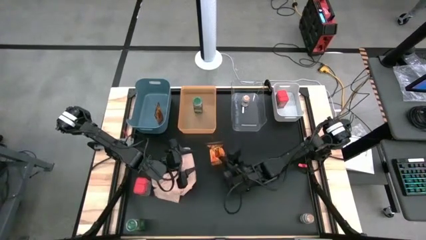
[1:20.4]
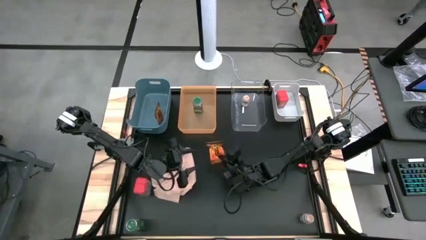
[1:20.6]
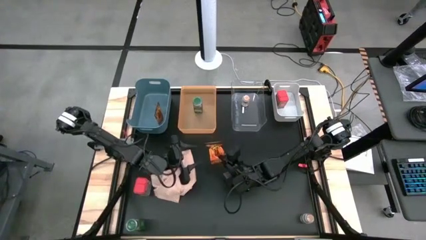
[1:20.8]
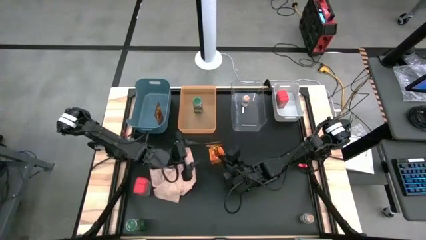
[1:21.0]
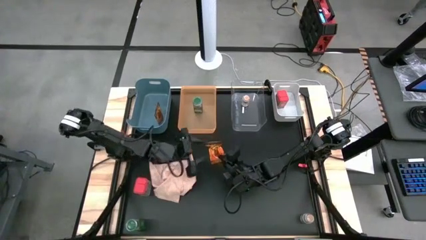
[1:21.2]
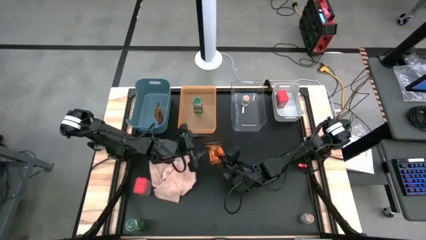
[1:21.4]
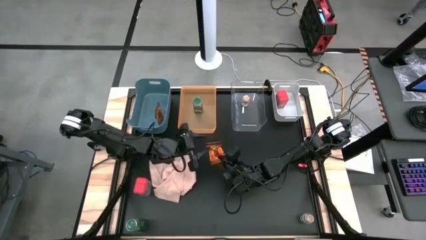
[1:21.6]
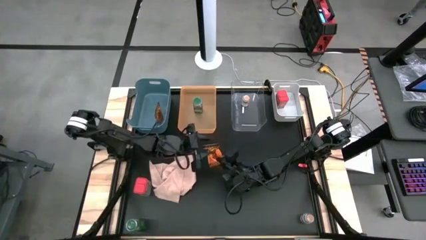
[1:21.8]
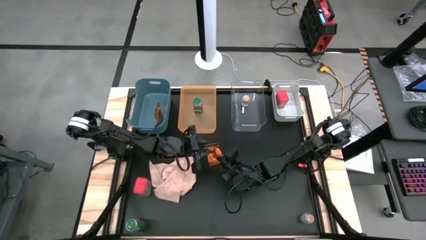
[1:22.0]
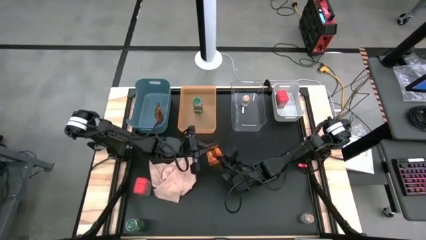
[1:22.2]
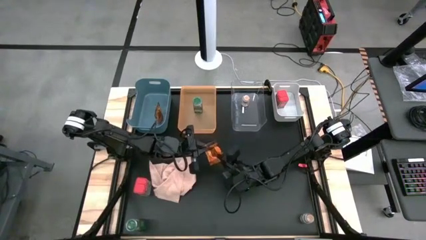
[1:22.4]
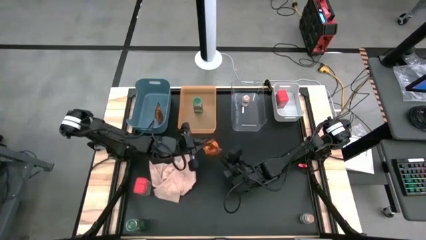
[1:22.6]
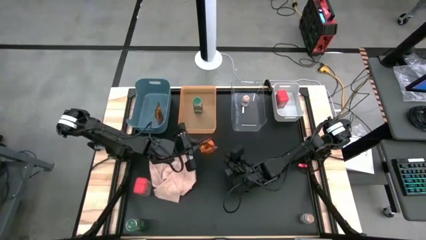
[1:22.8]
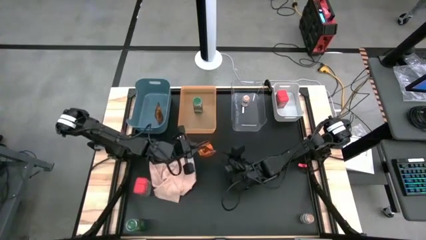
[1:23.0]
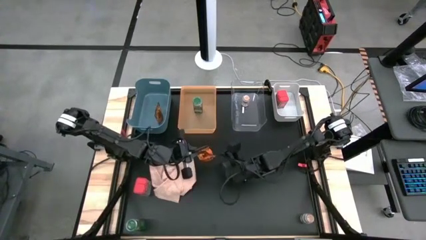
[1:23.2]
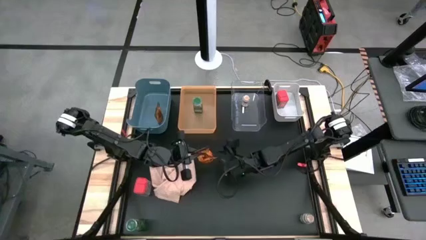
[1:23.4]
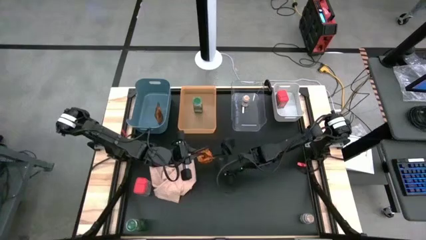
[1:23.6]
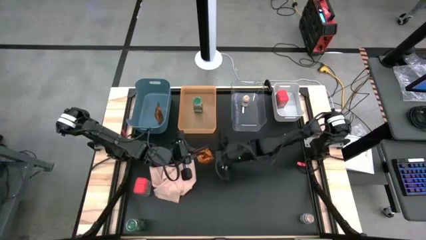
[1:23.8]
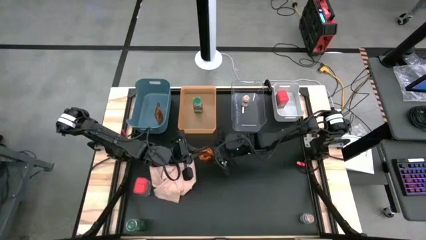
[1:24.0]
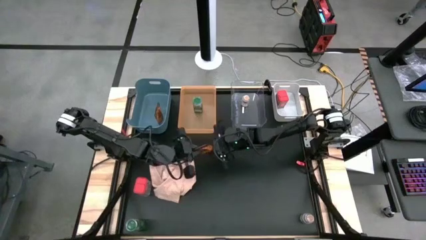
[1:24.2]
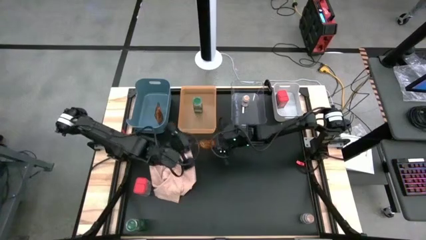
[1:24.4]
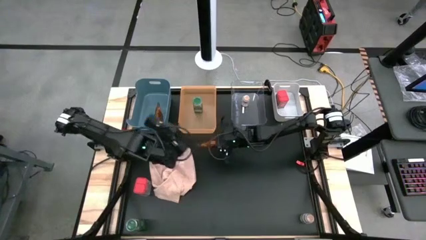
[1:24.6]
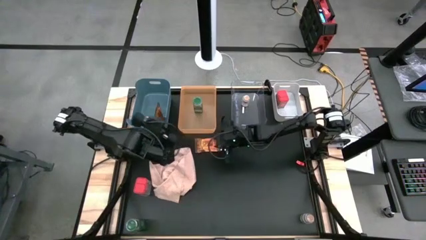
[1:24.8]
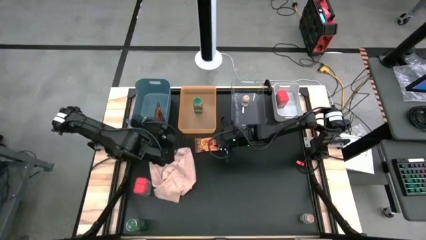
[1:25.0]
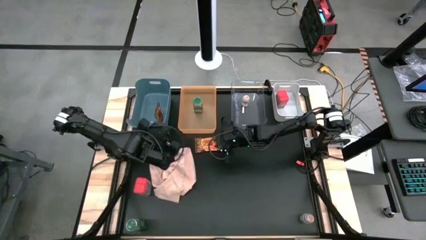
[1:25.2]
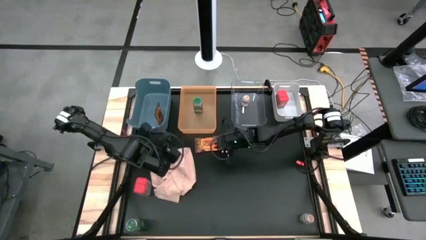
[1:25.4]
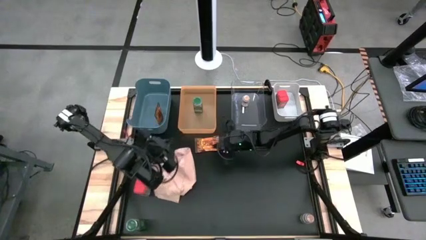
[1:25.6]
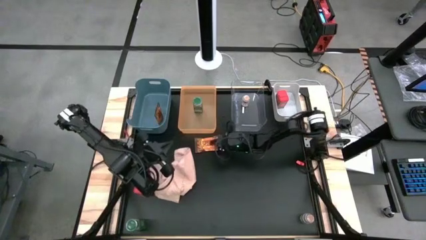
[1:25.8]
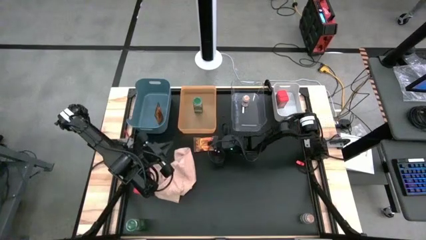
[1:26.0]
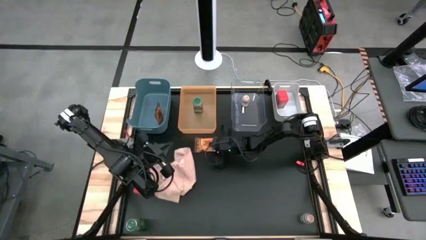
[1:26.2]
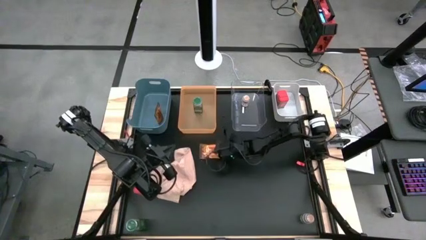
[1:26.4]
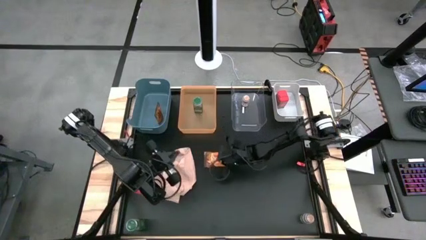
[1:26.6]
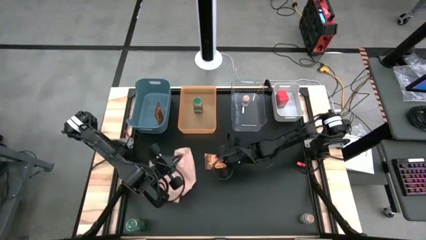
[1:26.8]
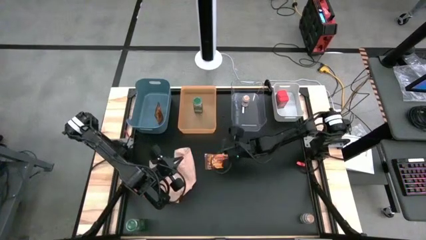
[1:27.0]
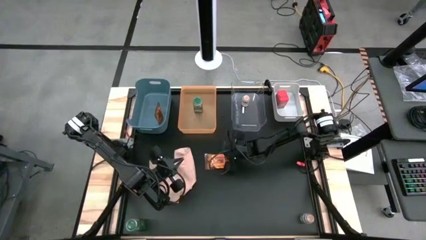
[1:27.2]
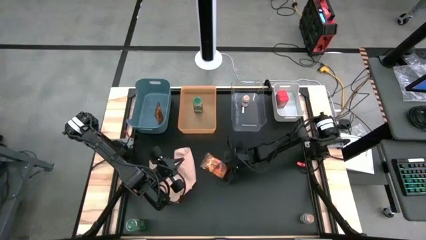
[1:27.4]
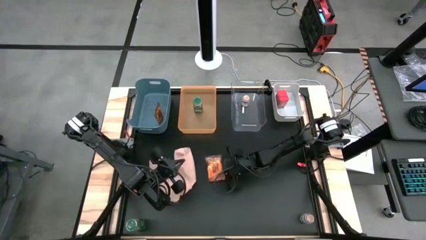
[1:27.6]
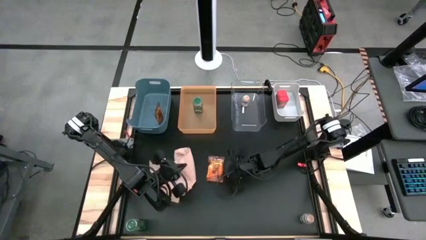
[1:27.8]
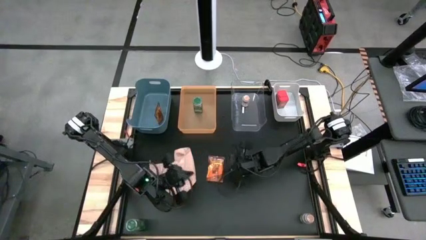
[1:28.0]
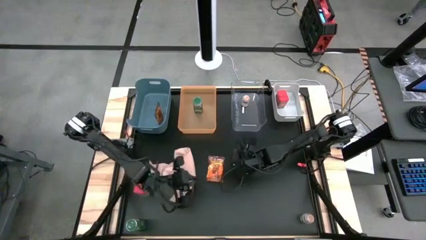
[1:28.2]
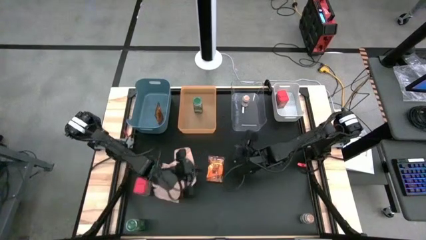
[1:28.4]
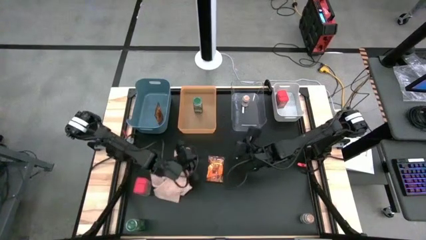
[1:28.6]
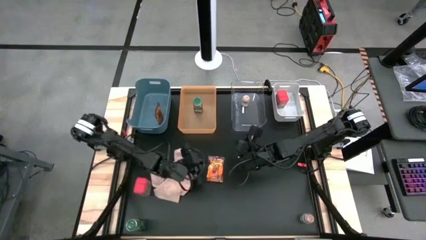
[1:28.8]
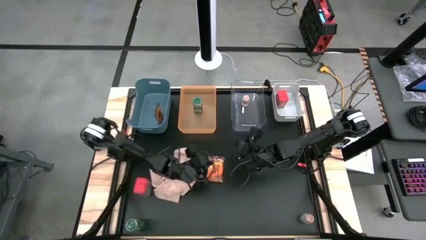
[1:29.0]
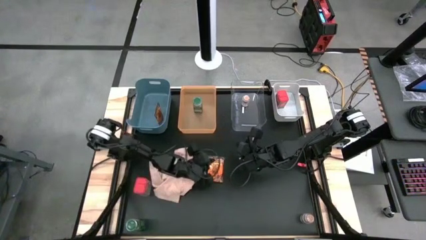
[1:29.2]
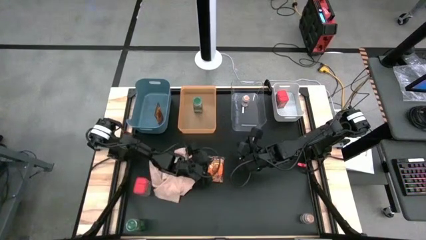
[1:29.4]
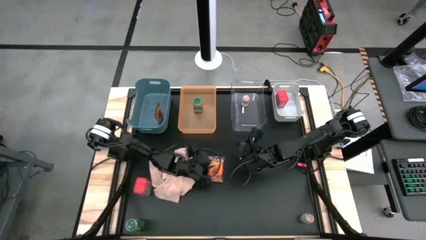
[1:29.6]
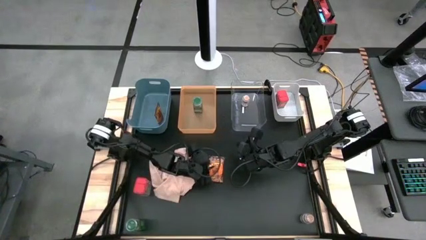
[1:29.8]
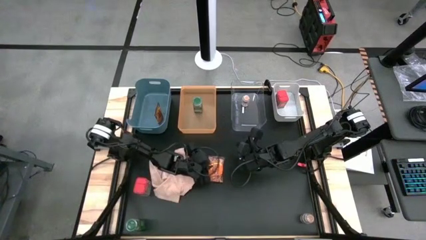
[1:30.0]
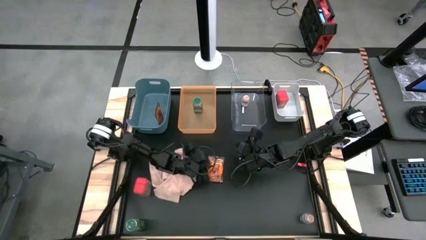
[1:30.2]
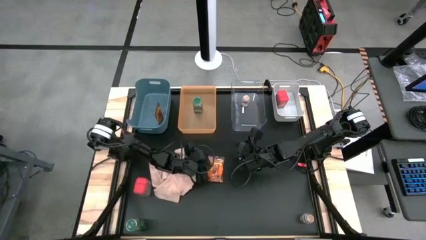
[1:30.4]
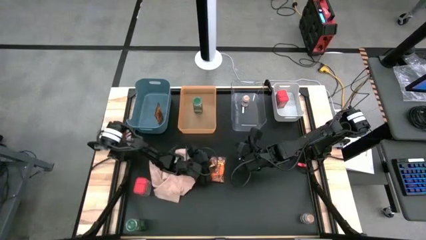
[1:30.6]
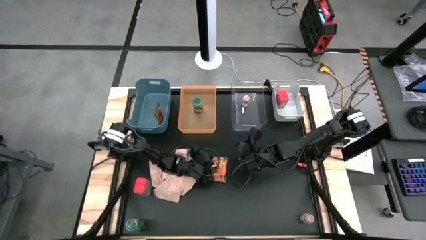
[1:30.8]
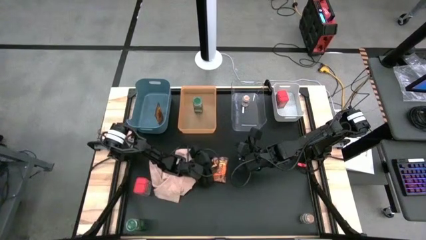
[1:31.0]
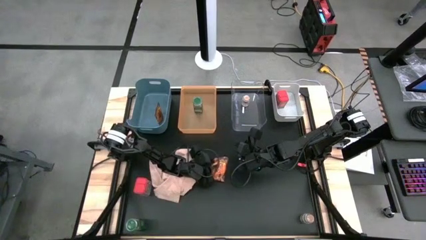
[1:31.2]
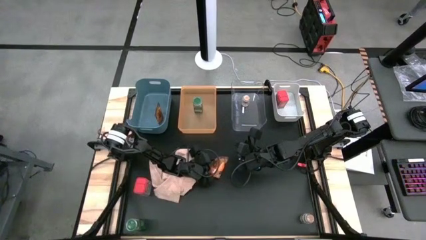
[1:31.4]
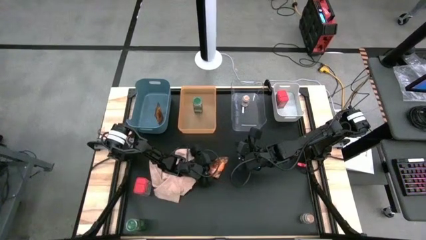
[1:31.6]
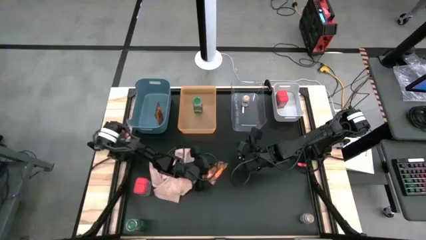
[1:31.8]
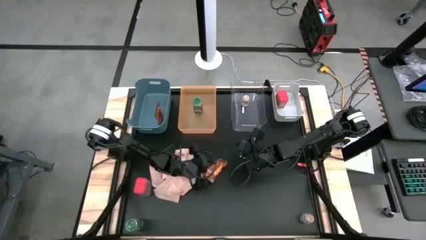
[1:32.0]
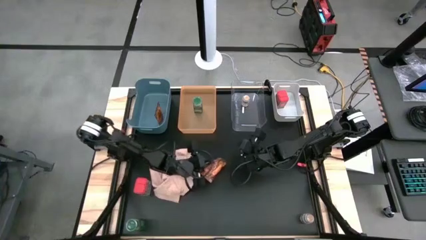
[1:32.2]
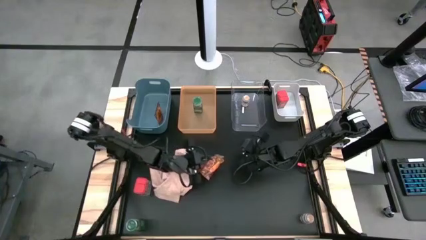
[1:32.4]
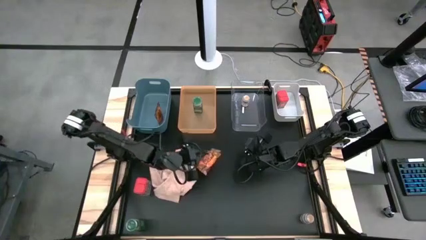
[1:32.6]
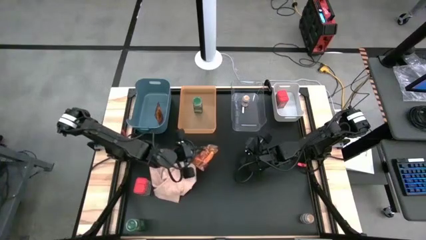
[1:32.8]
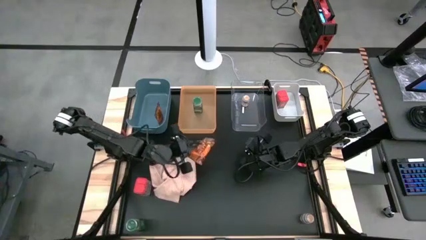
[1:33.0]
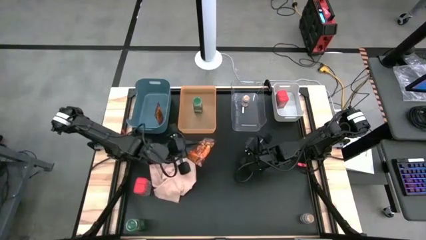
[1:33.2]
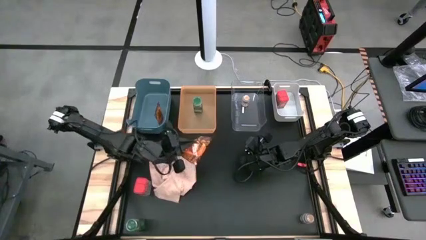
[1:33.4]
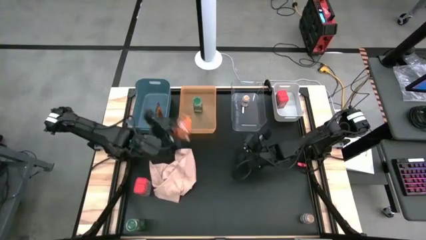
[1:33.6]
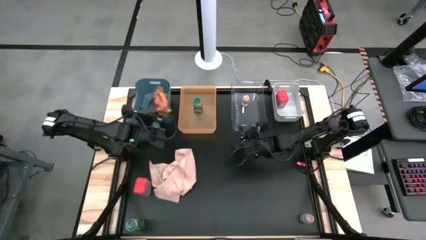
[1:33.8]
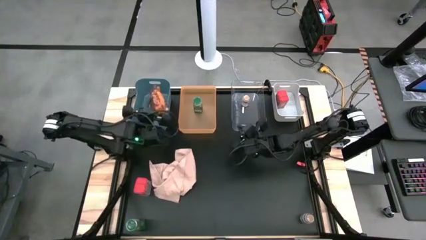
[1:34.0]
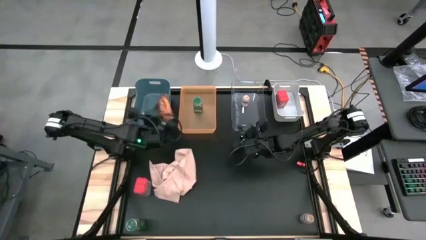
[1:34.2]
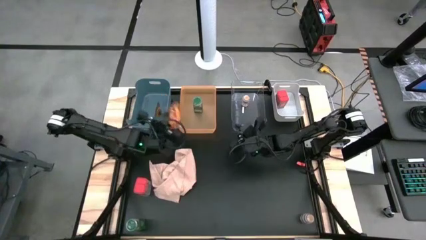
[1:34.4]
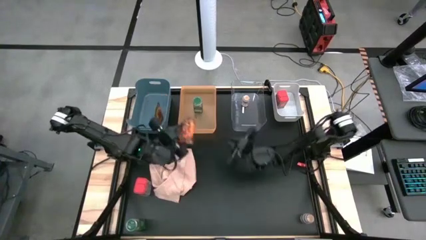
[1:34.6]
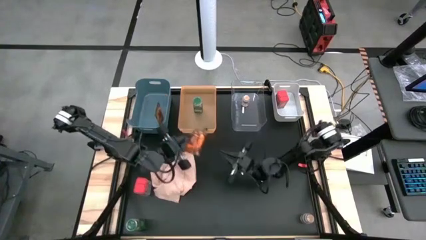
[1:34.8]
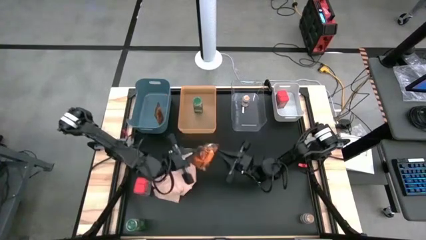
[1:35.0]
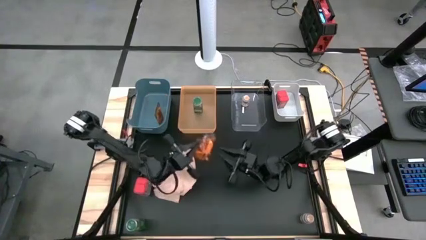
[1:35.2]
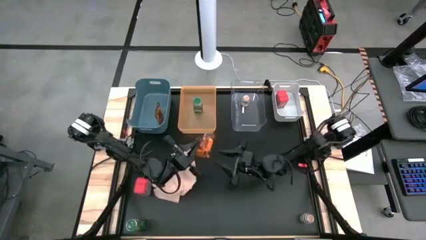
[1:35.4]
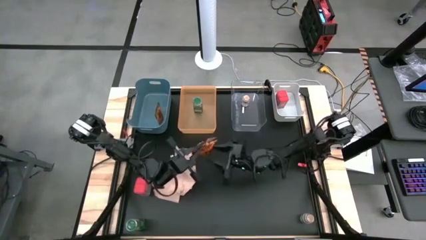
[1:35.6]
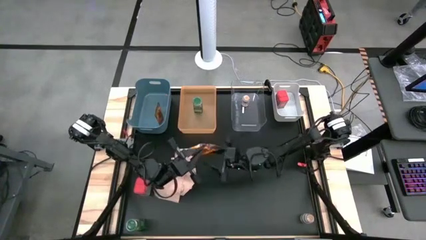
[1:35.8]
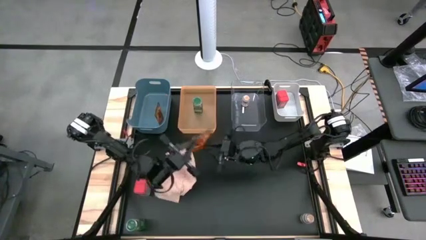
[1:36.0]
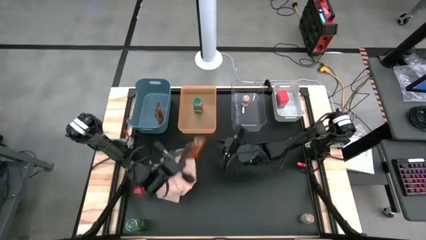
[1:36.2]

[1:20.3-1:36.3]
Task: Sort spices by type
Put the orange seasoning pack into the blue bin

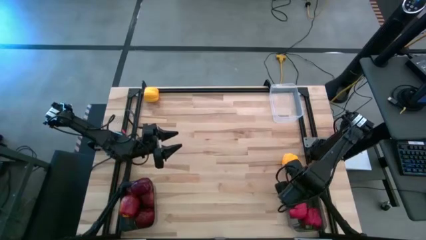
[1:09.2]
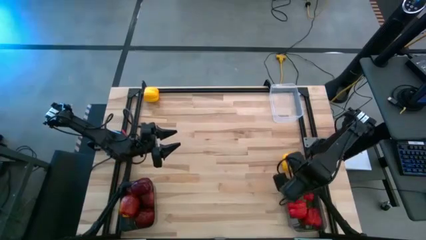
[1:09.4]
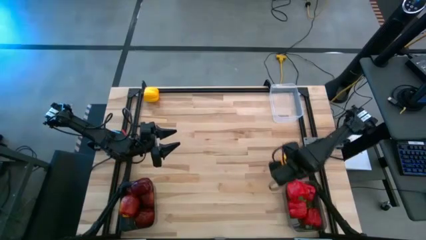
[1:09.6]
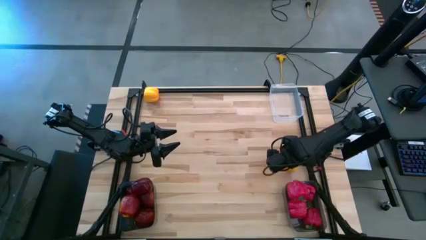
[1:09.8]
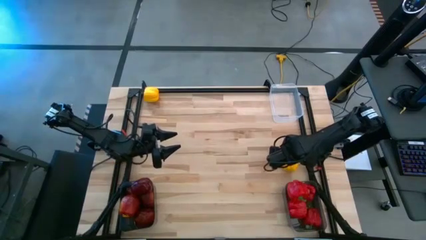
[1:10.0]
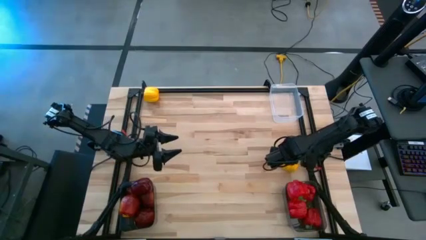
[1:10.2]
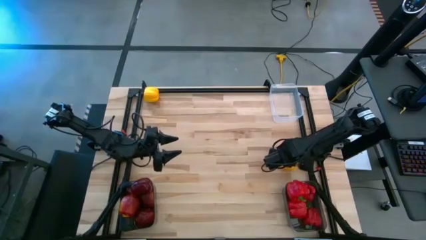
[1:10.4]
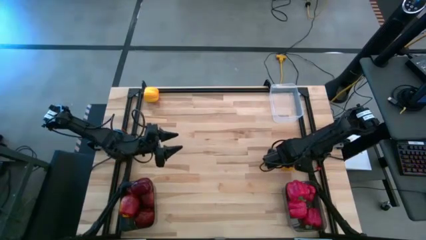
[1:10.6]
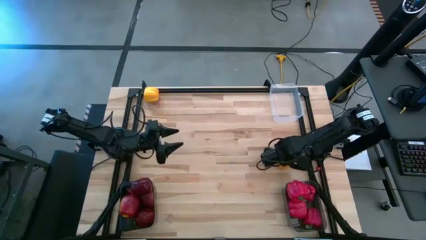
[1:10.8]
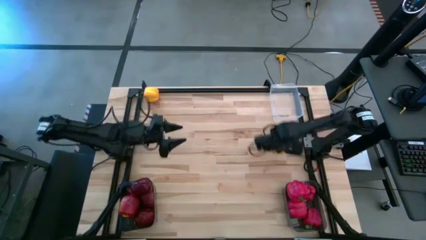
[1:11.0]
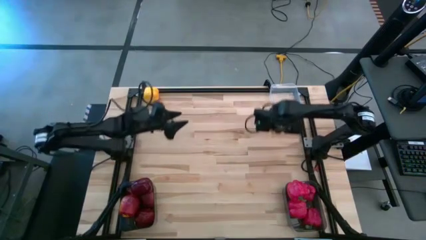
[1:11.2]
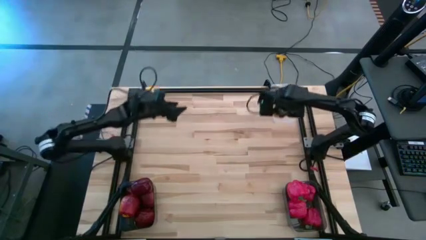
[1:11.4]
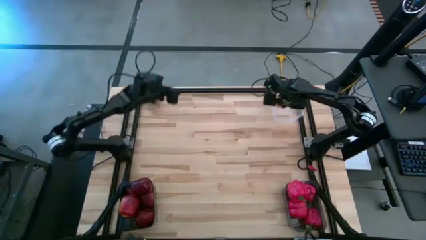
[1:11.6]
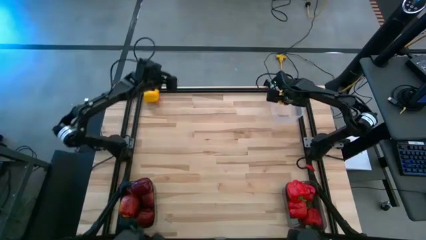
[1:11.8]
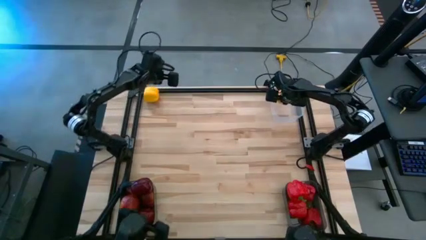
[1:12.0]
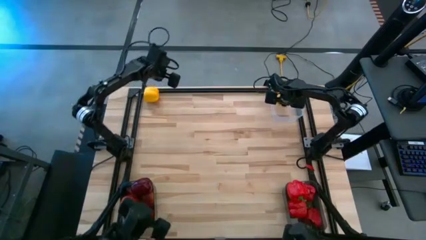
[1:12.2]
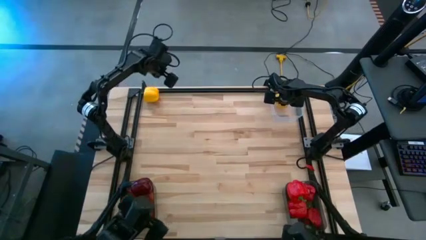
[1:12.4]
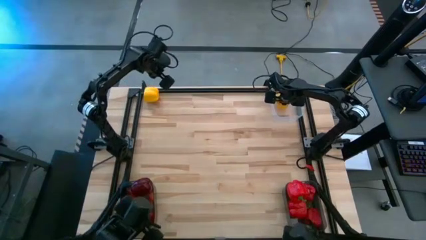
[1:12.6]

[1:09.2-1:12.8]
Task: Sort produce into baskets
Put the yellow bell pepper into the transparent bin
